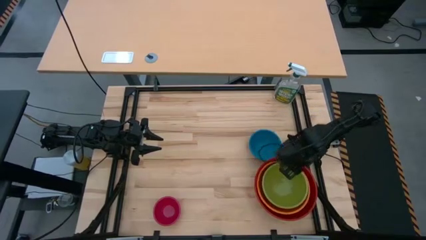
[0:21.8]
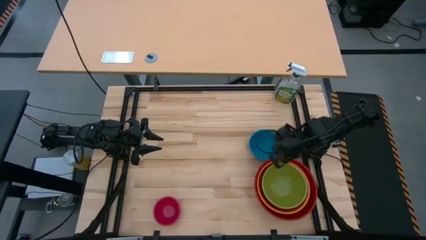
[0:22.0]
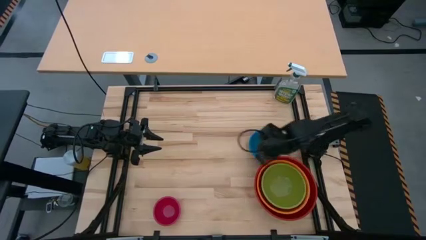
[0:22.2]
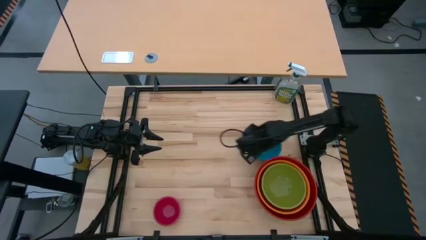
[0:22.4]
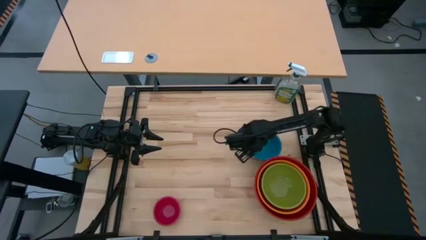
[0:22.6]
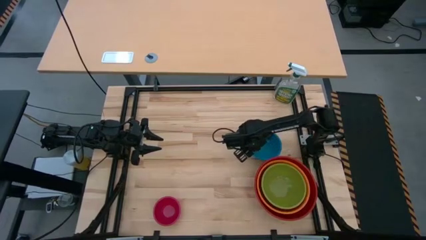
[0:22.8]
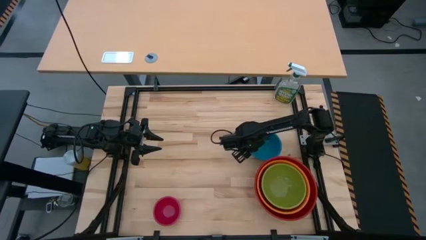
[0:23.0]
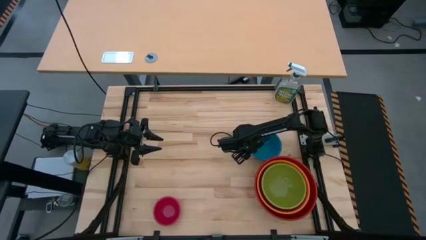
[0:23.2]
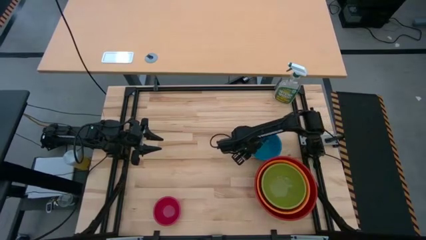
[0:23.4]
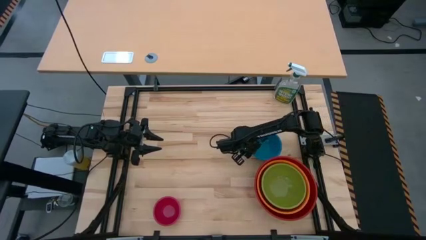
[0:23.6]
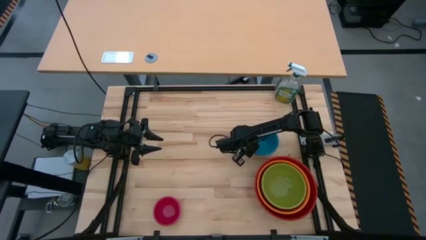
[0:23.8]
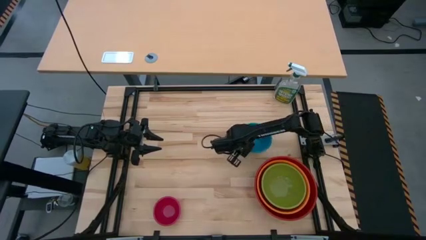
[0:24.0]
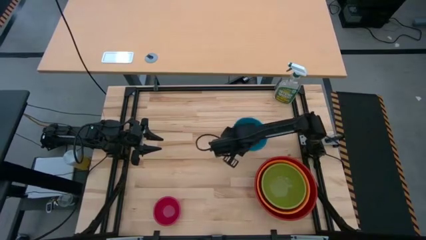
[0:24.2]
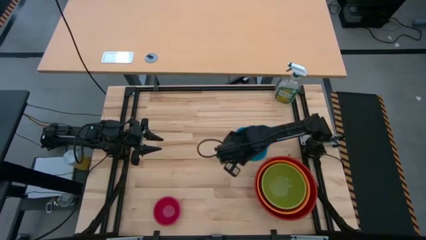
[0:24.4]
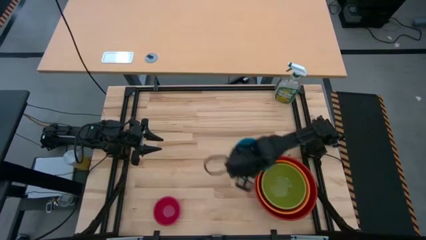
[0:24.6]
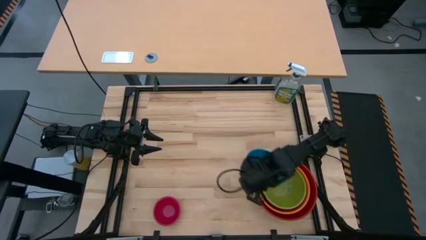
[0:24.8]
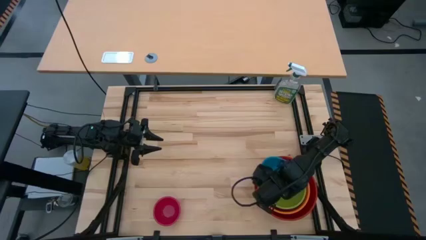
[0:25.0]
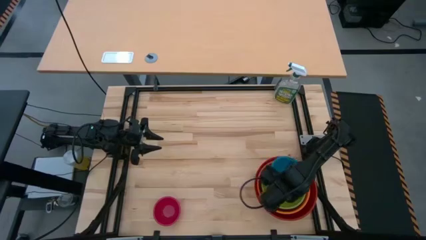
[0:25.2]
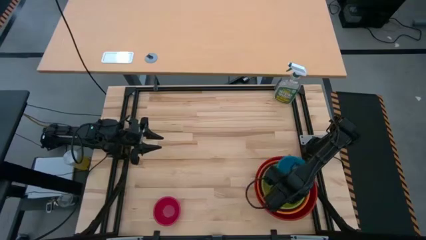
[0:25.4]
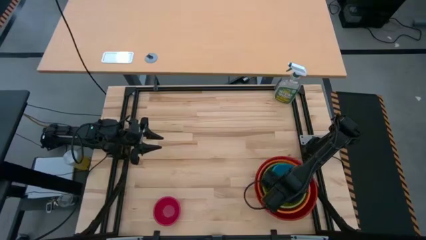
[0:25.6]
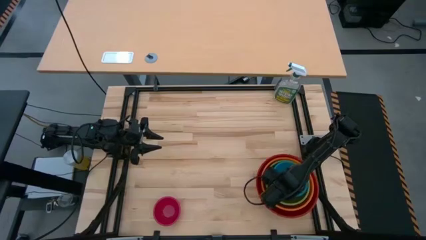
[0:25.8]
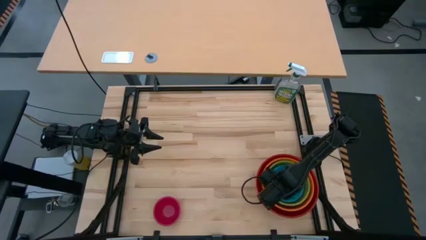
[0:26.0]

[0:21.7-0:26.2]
Stack the blue bowl on top of the green bowl

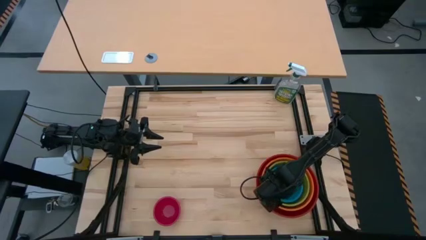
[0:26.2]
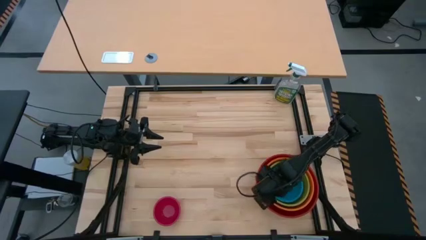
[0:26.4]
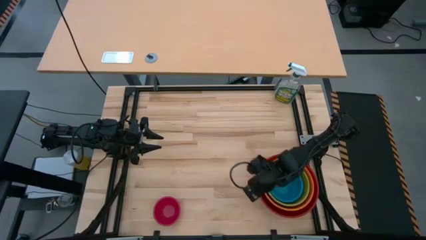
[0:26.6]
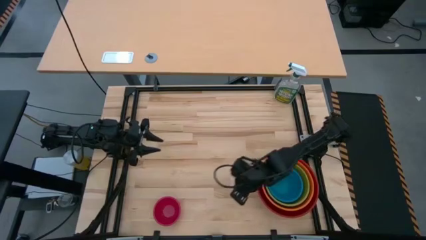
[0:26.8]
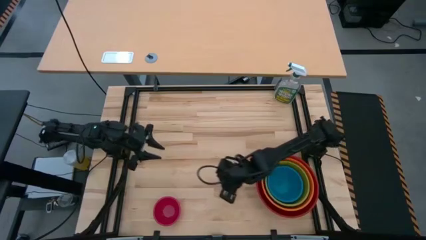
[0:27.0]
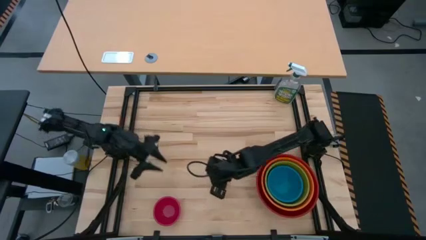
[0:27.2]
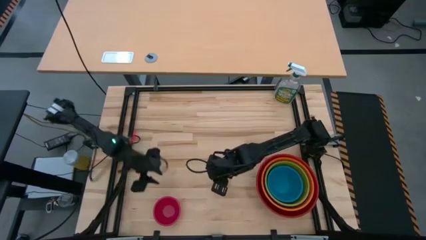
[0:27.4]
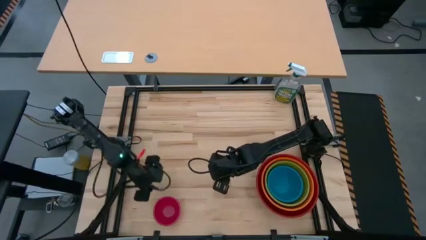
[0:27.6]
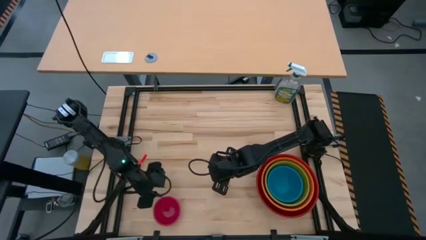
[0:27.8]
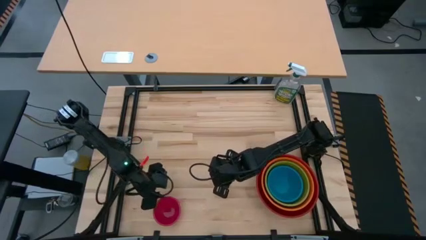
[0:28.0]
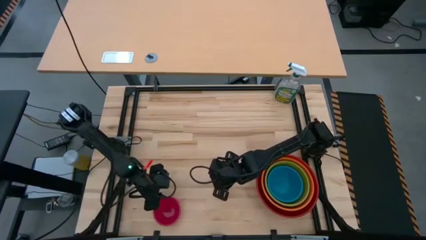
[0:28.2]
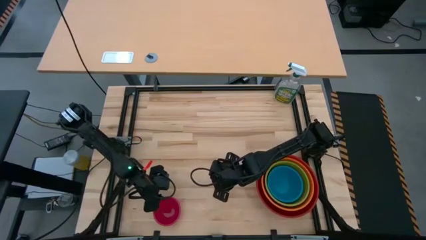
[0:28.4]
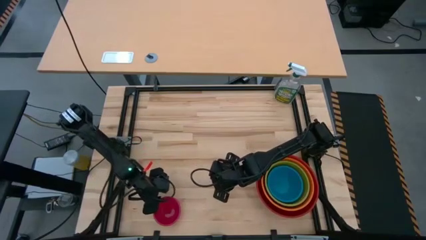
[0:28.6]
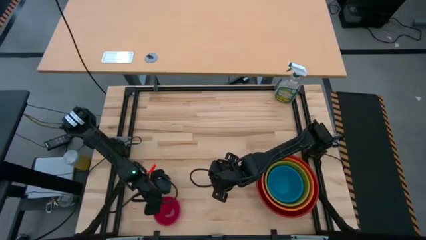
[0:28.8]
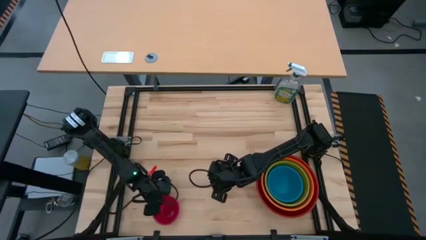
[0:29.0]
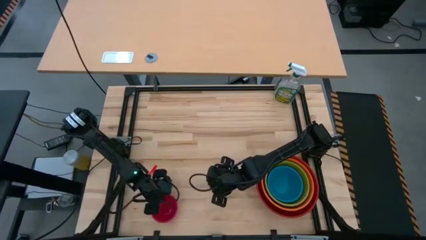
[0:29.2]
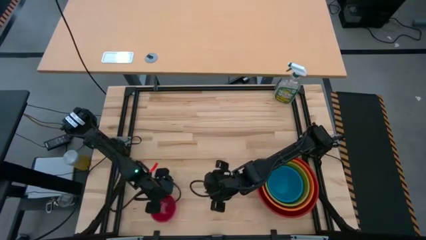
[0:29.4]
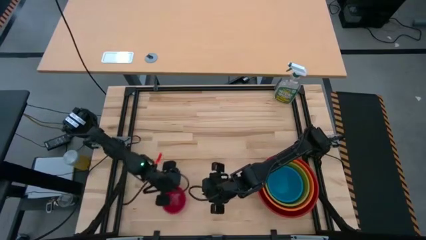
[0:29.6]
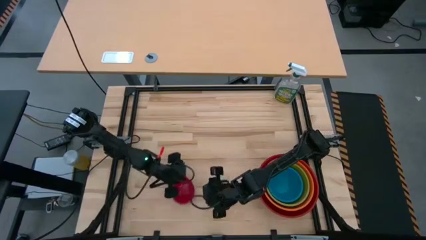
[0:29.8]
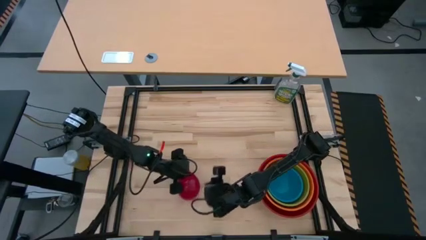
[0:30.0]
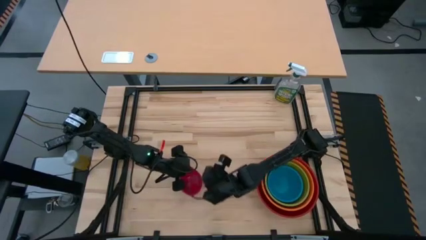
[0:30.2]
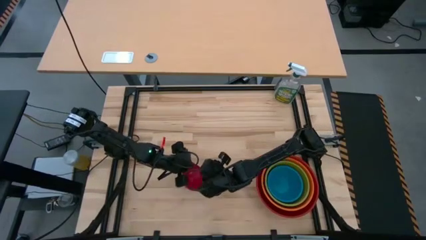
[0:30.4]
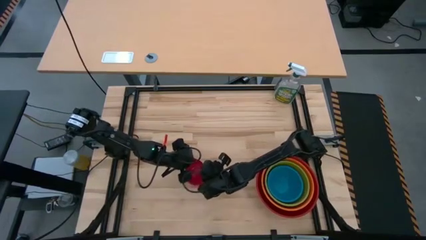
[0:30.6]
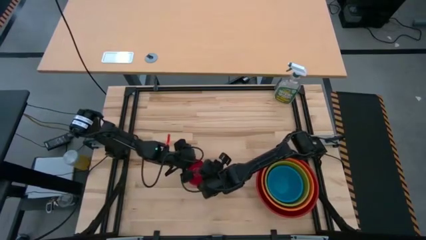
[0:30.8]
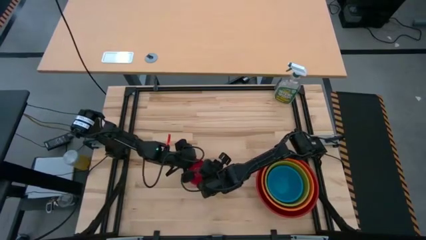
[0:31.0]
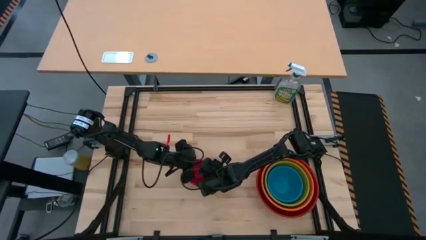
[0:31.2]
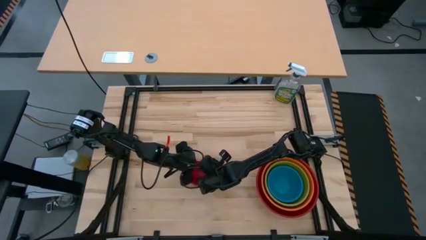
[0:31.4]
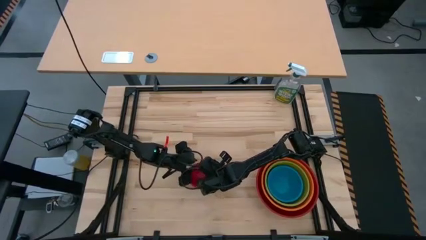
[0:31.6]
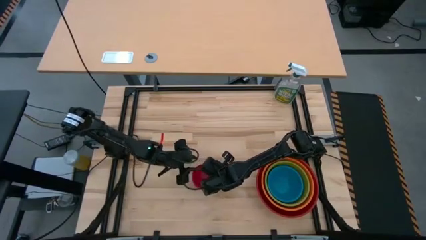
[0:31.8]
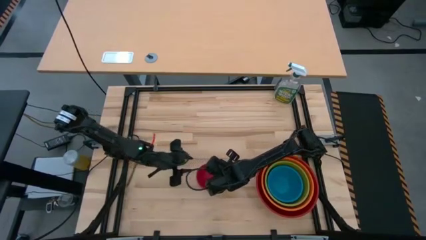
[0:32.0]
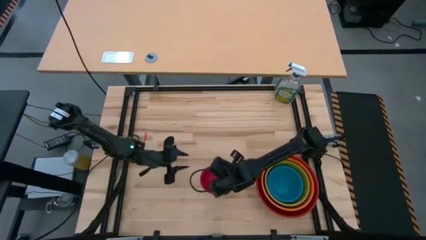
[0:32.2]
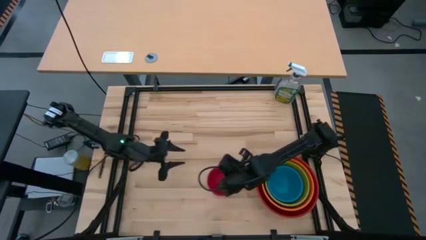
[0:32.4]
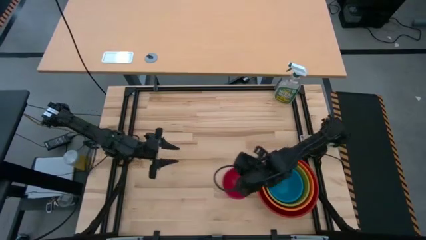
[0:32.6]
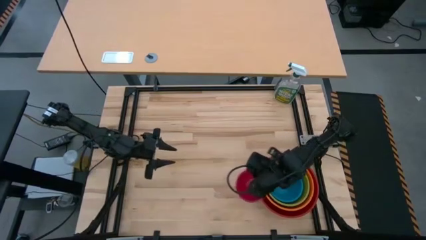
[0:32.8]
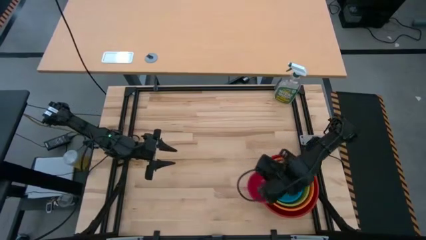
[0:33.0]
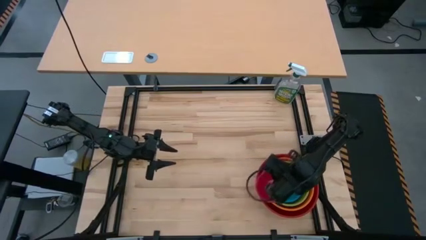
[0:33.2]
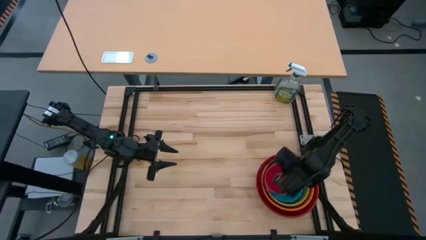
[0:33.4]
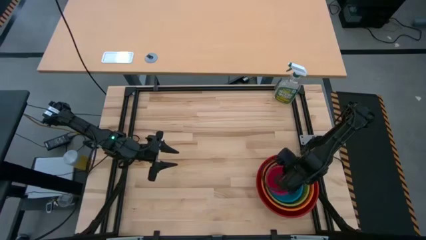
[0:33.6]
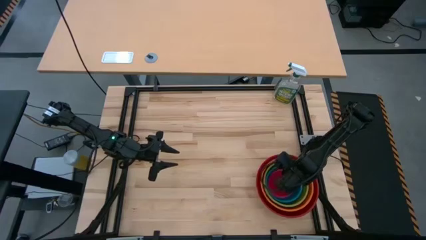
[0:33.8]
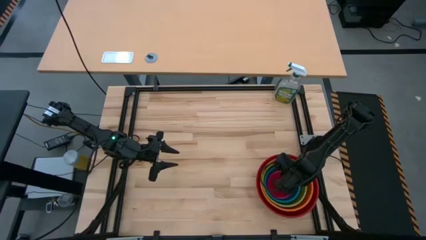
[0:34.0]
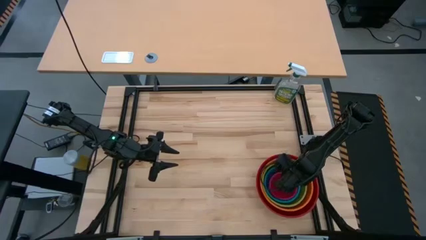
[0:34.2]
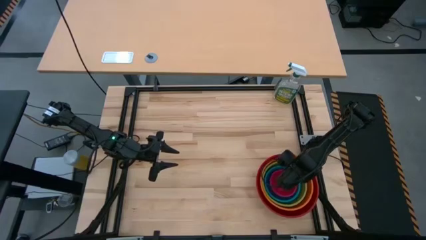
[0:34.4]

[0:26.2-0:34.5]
Stack the pink bowl on top of the blue bowl

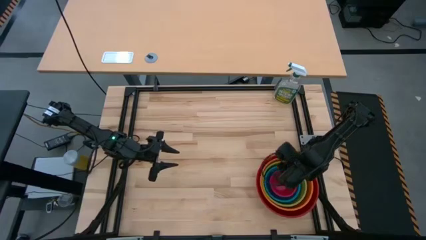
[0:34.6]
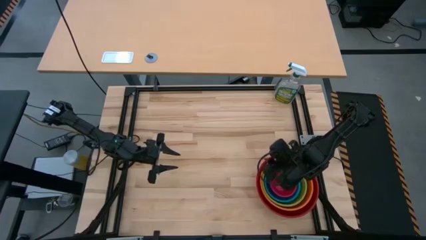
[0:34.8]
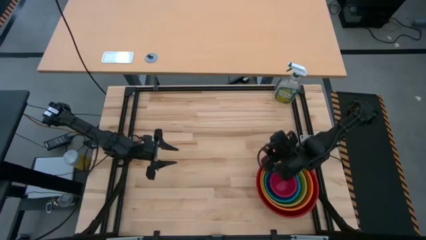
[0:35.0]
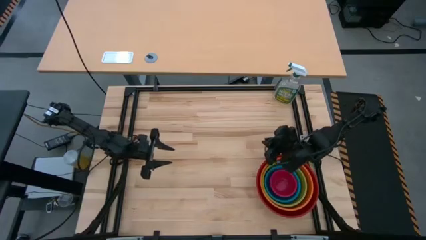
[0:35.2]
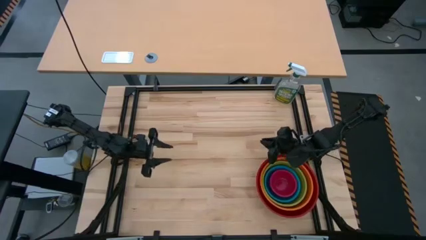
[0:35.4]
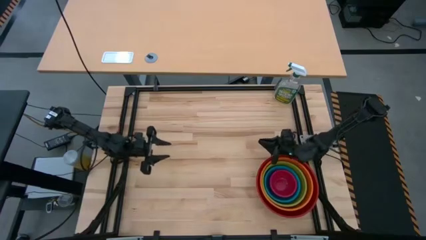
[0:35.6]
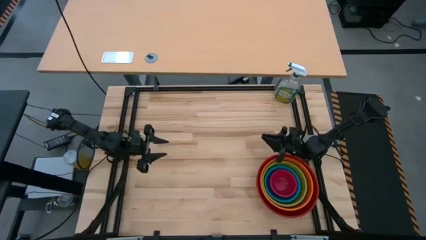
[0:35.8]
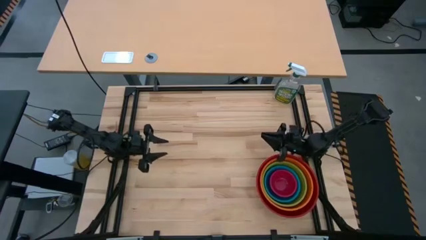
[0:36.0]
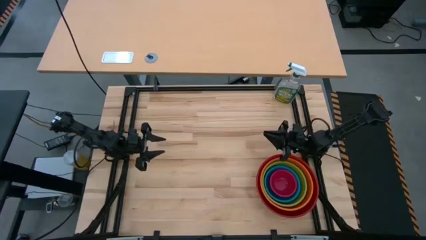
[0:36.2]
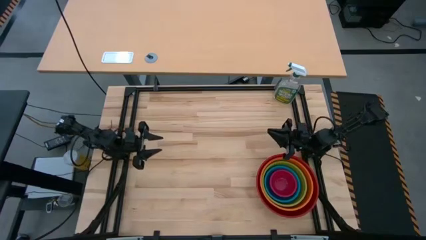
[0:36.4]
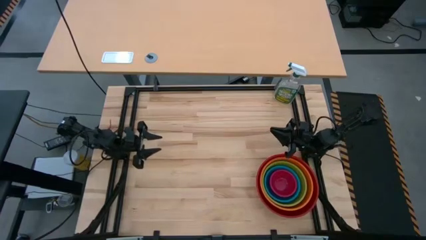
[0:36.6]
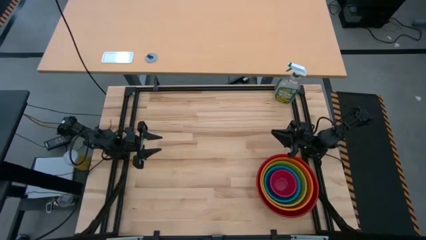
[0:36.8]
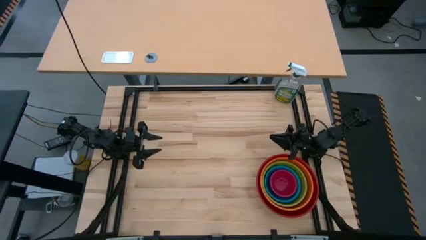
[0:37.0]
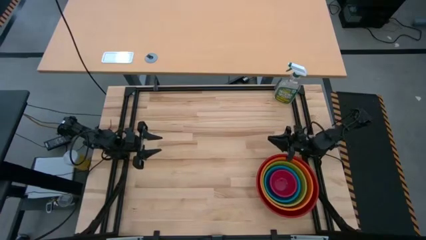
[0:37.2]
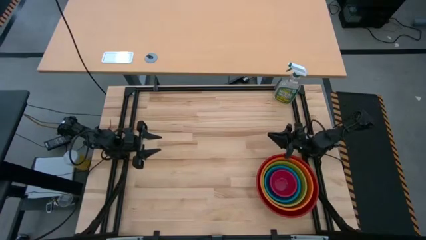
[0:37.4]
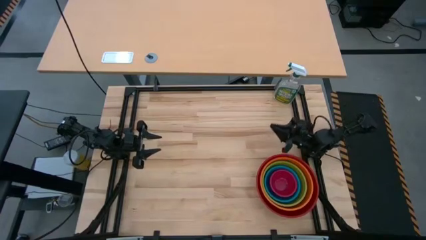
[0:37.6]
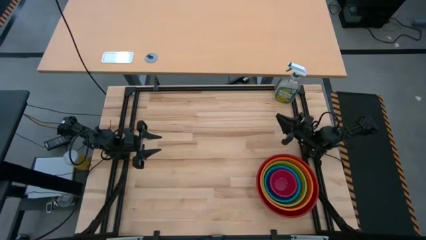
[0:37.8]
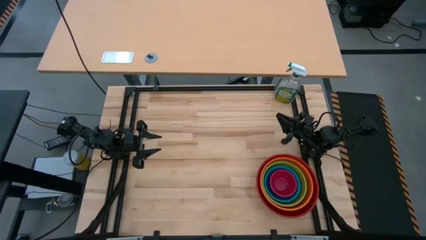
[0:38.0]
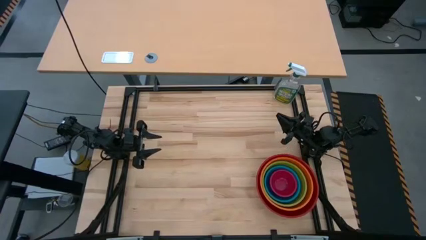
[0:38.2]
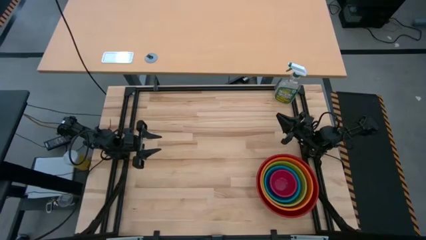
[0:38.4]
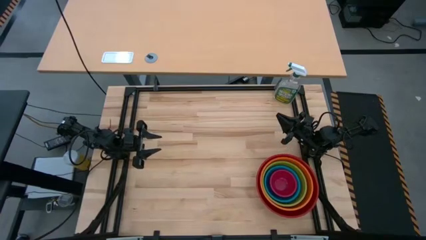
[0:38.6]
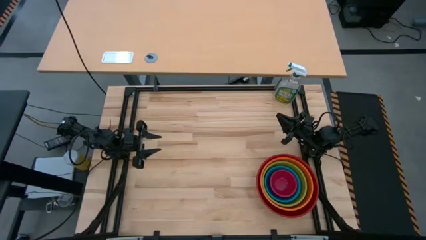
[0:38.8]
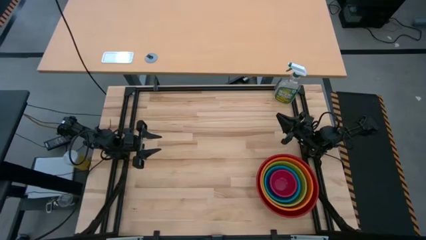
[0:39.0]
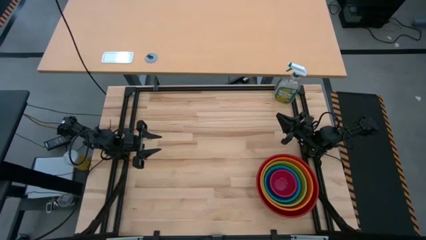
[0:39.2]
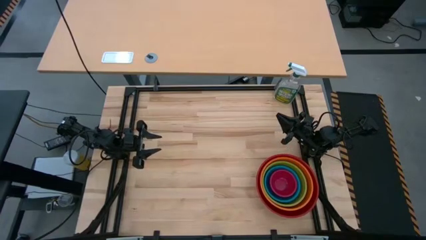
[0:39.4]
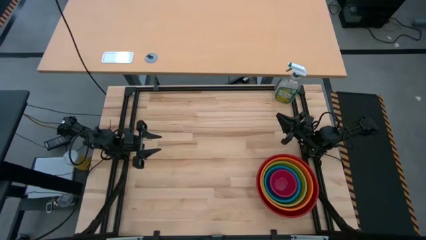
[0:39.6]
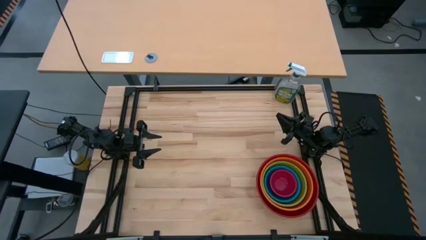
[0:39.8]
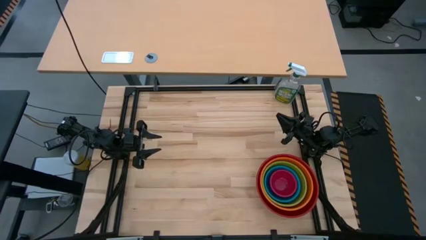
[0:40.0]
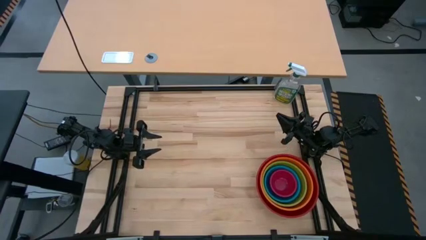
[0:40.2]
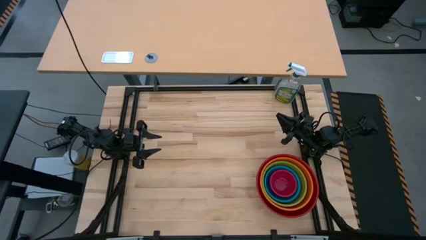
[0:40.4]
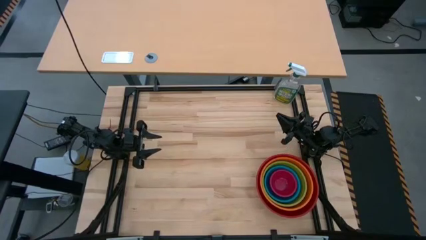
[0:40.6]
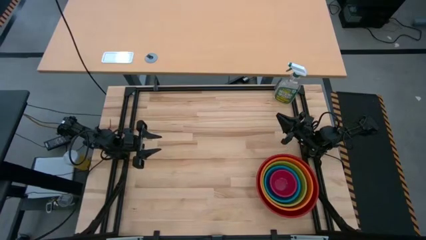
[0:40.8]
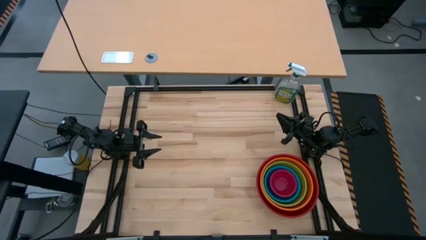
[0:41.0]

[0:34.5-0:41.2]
Return to Home Position
